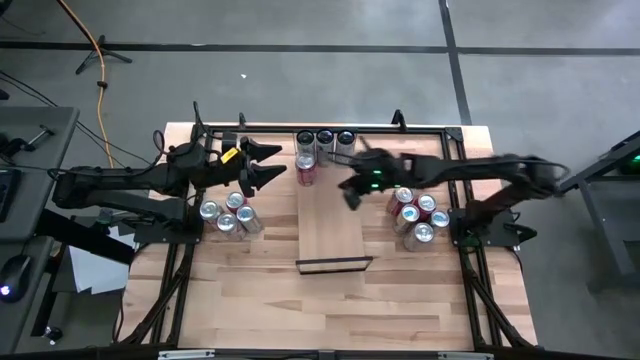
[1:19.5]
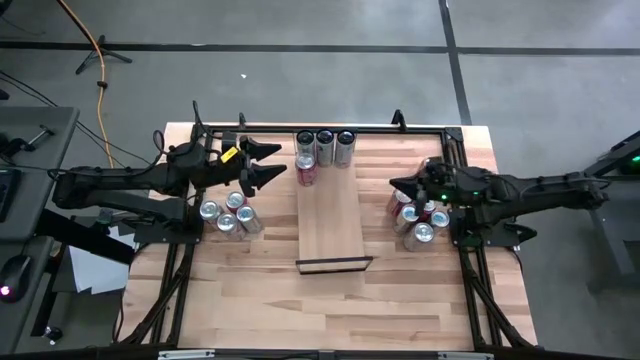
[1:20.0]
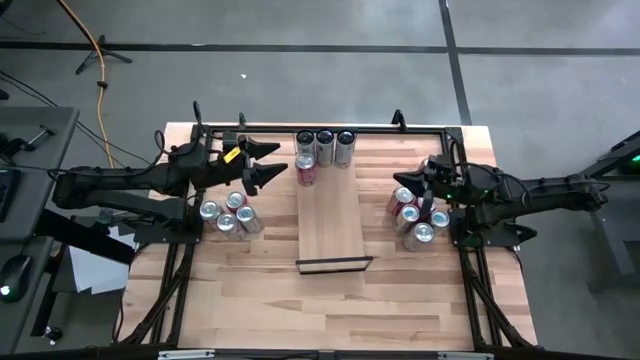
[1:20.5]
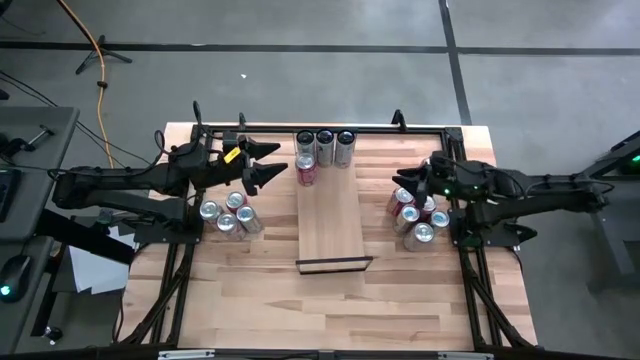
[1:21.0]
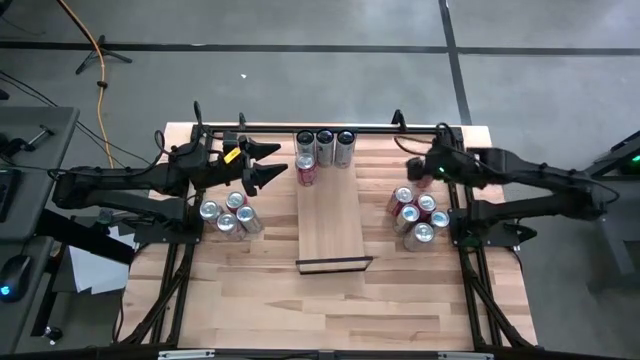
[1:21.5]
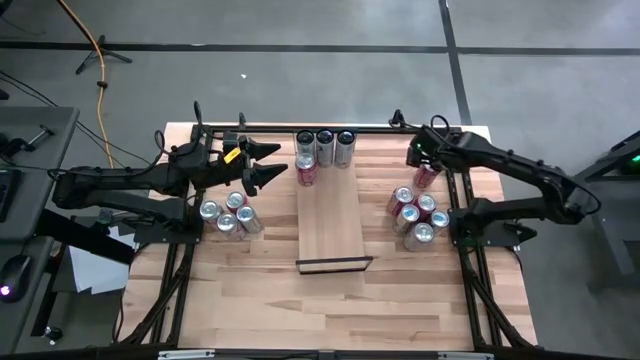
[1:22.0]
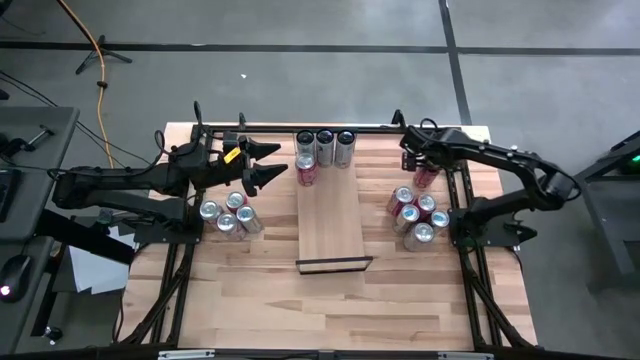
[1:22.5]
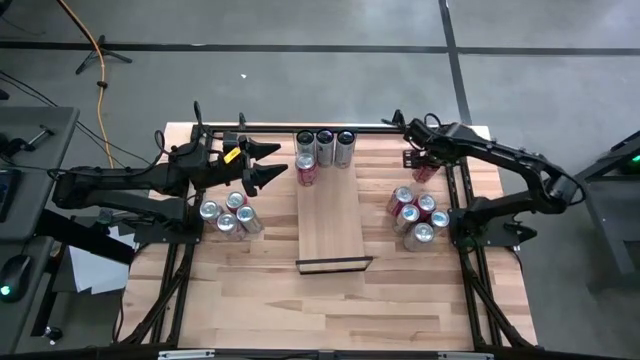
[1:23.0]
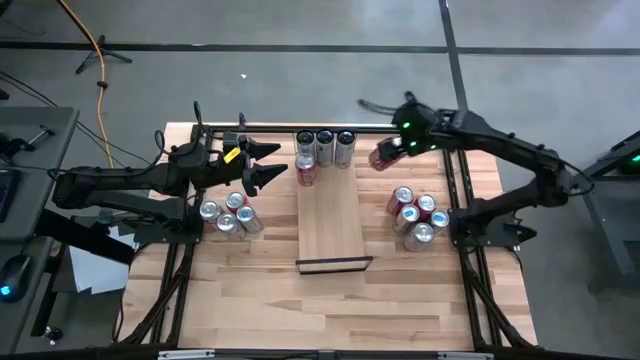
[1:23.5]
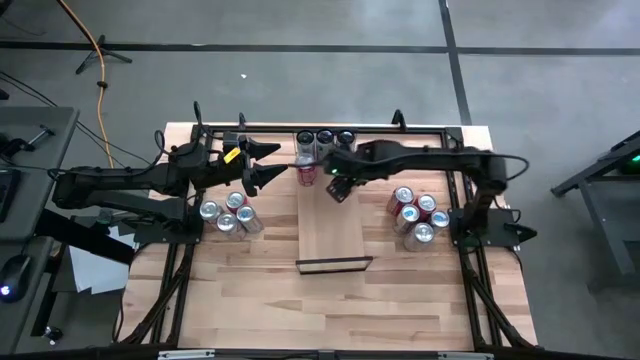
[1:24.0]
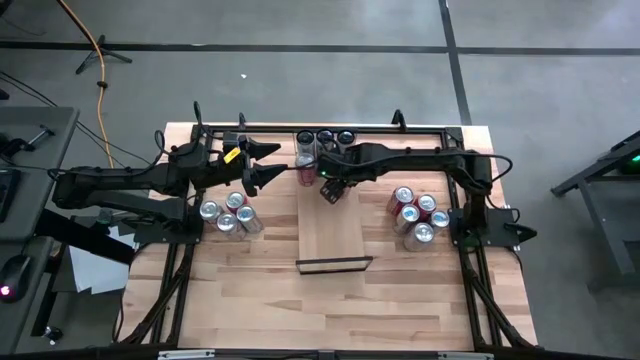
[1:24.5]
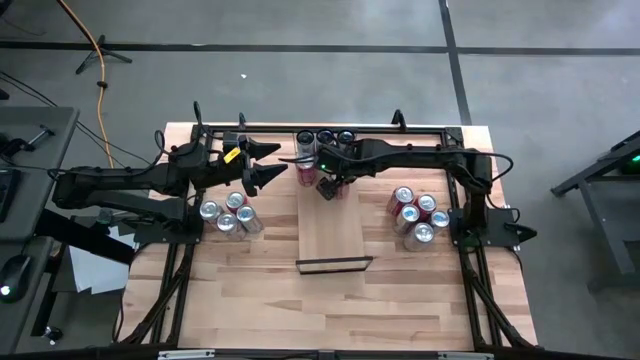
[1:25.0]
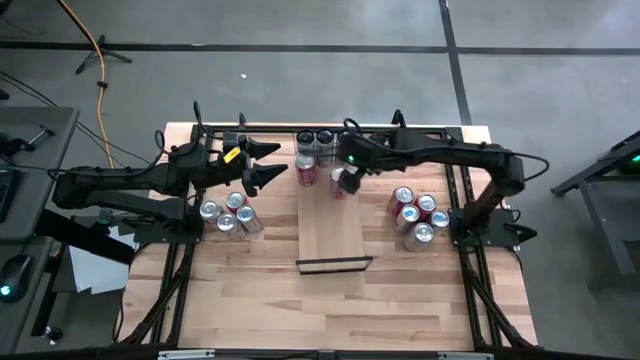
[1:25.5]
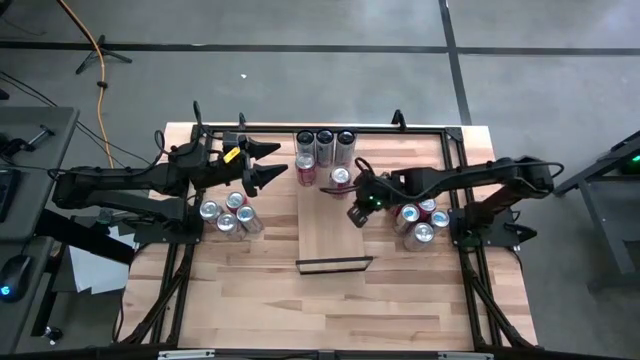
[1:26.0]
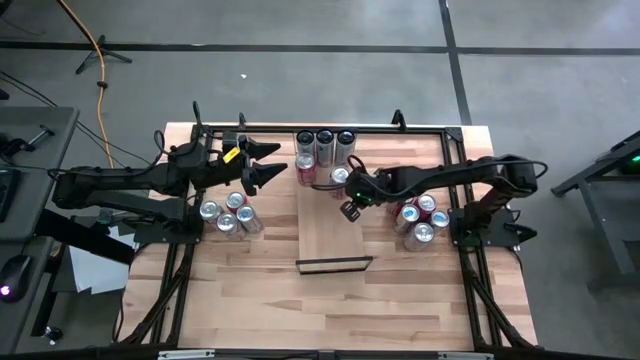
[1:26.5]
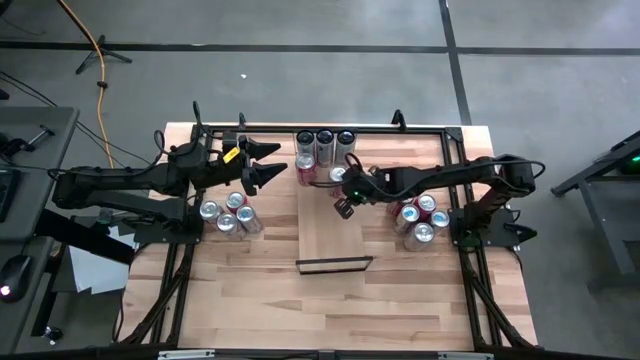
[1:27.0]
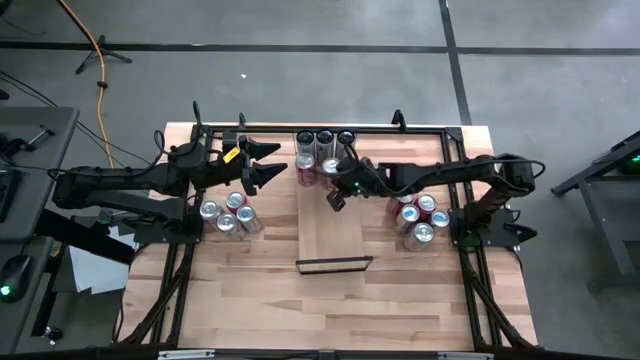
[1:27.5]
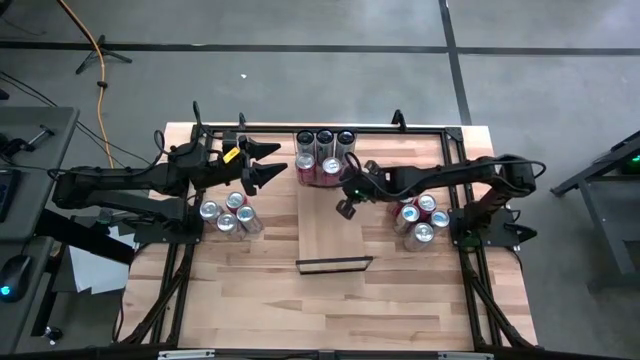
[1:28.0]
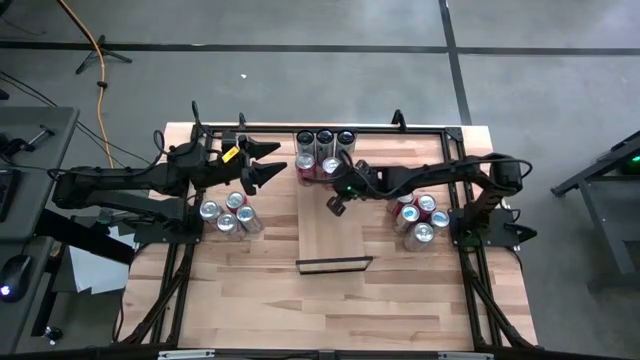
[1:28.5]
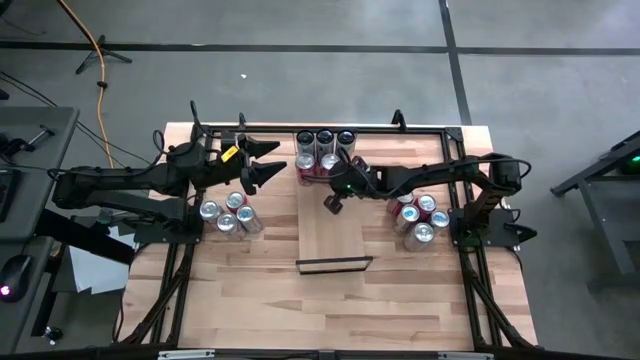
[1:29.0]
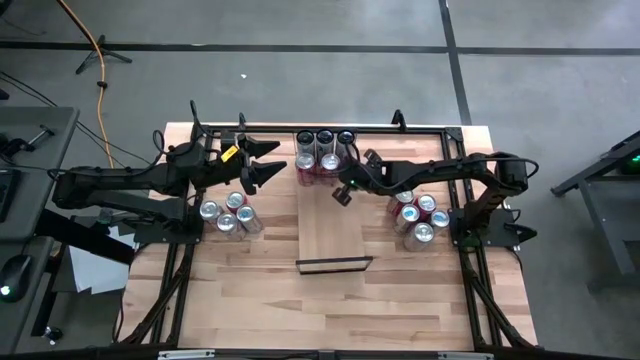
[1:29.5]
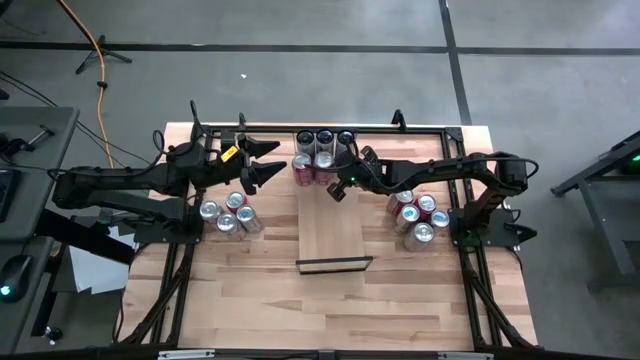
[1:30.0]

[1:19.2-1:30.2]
Task: Place canned beverage on shelf
Put the top red/white soda can on the shelf aligned with the other red/white soda cans

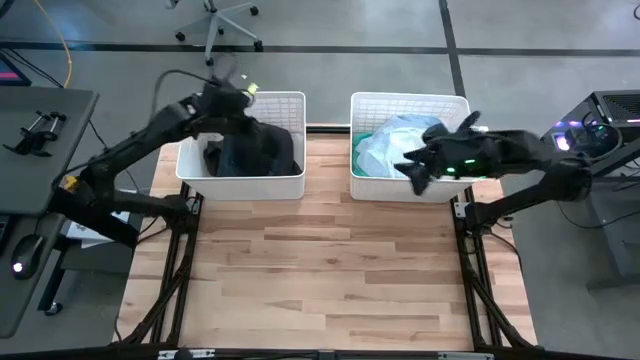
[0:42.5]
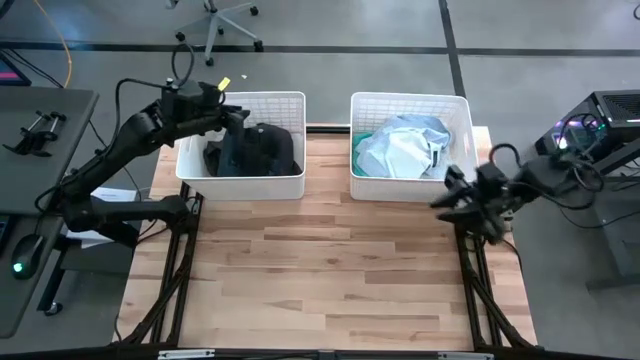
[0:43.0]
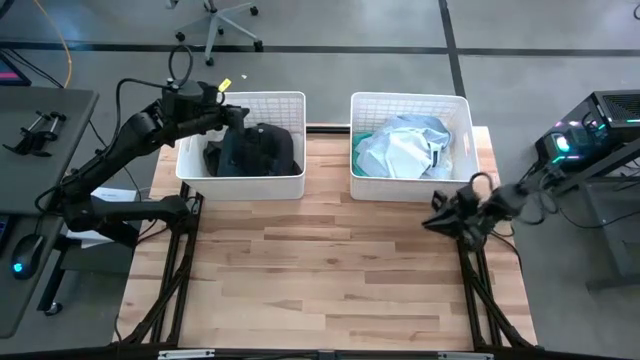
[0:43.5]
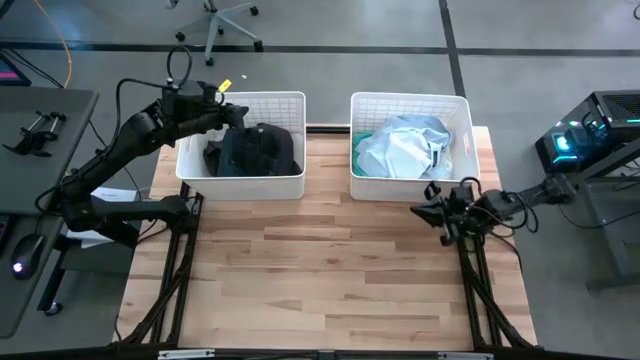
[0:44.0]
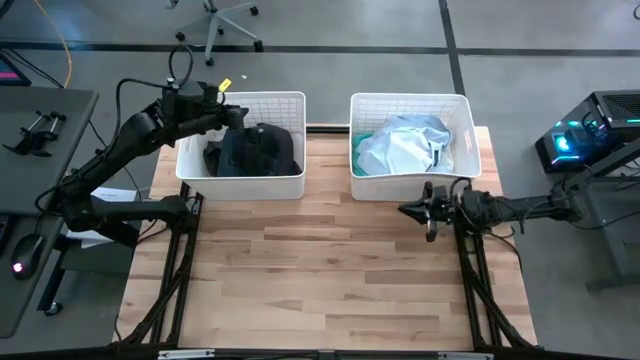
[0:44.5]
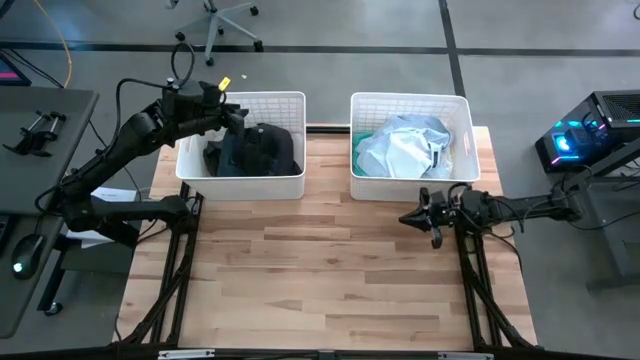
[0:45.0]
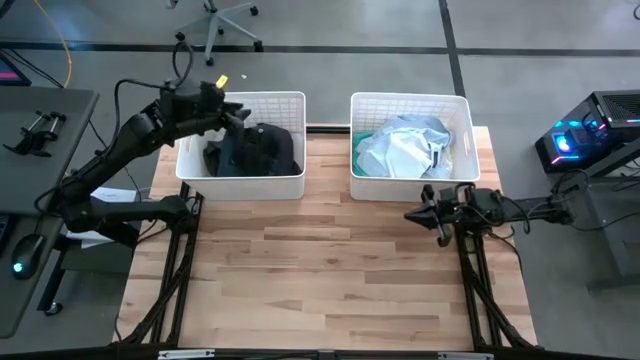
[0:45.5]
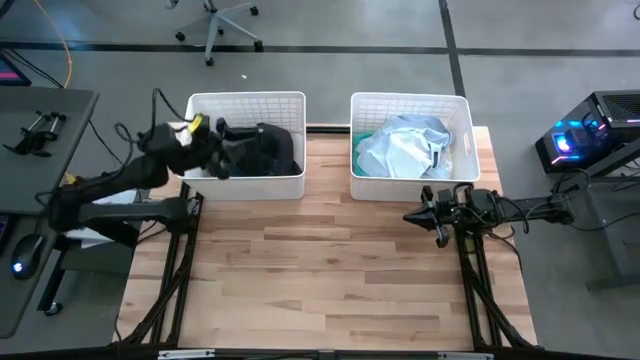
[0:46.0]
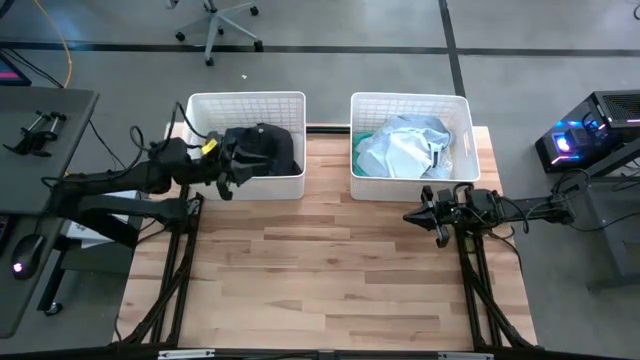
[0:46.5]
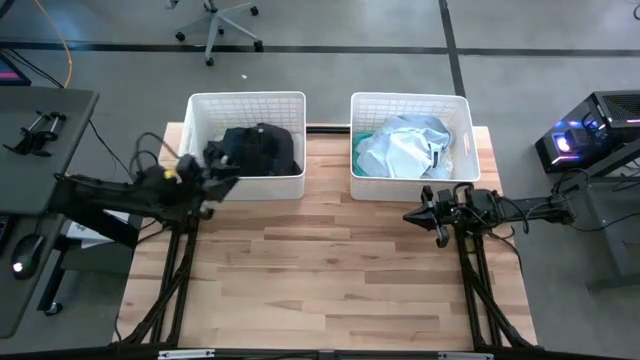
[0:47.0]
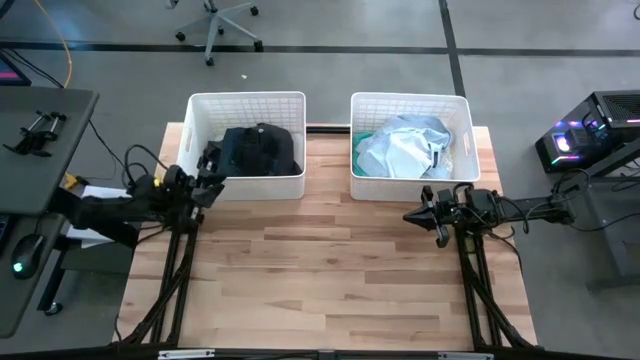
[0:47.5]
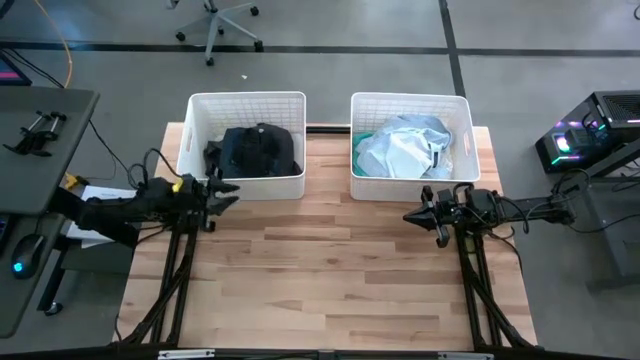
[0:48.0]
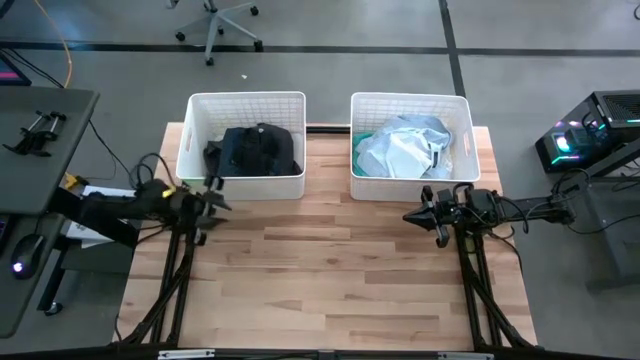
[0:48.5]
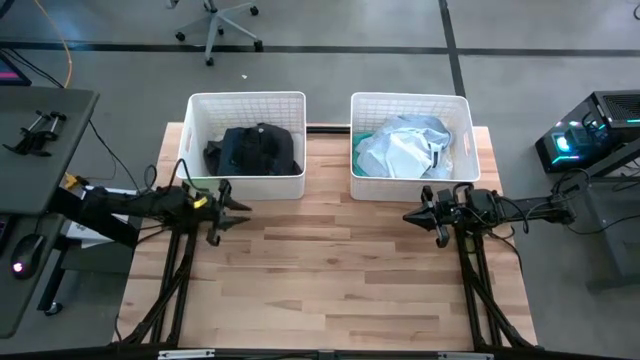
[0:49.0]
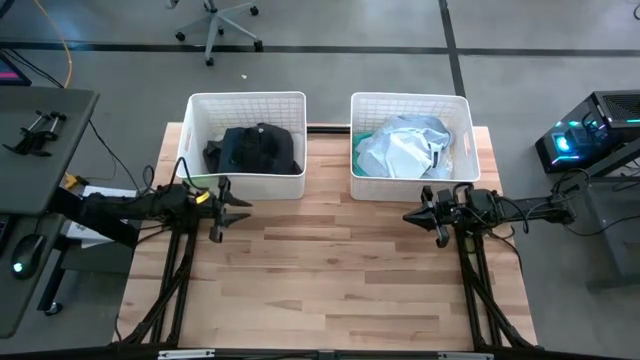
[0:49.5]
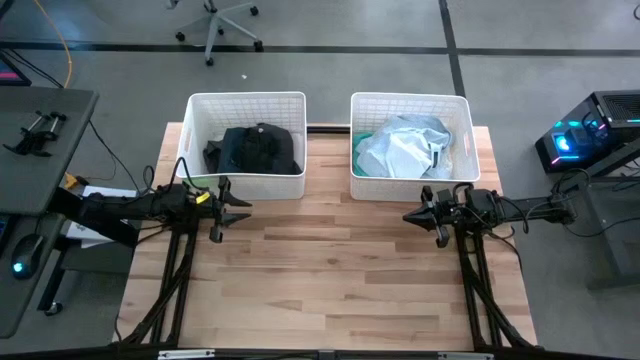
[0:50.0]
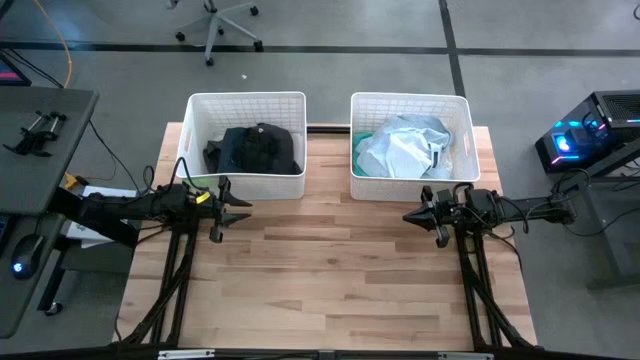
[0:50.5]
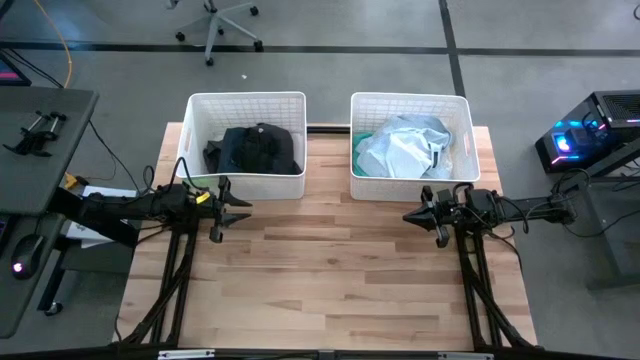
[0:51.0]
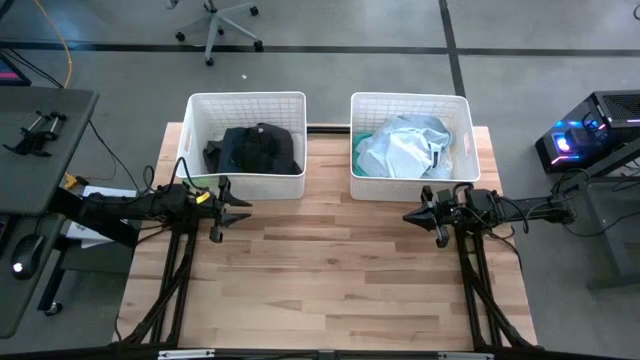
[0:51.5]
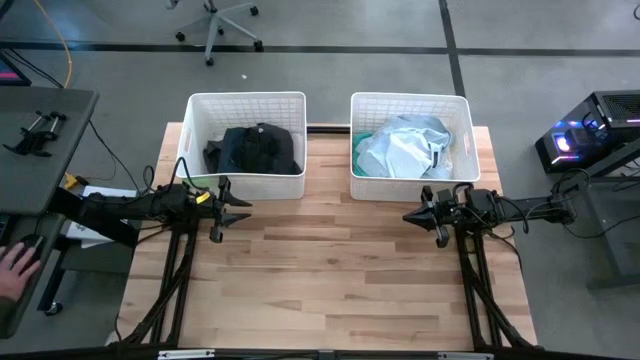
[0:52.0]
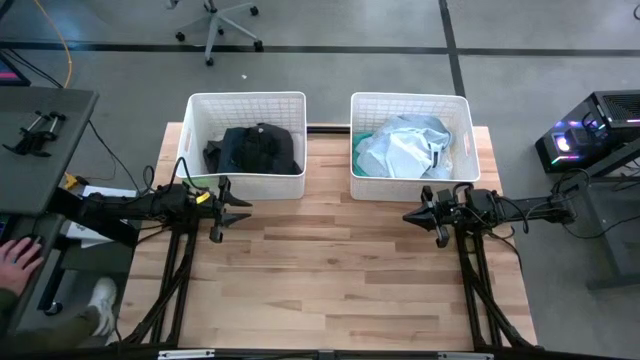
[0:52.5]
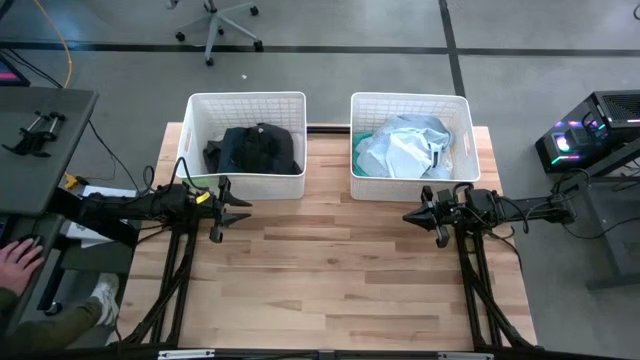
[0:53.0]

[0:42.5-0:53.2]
Task: Sort clothes
Return to Home Position
